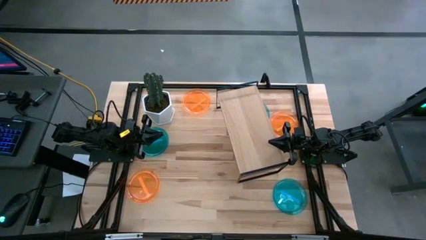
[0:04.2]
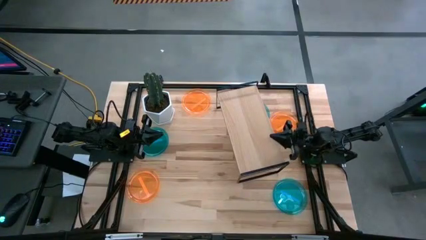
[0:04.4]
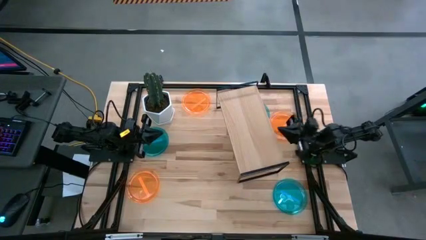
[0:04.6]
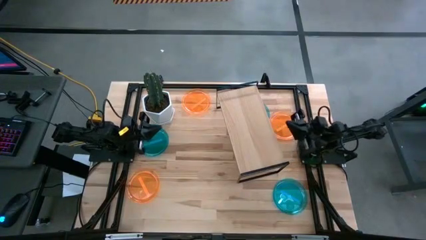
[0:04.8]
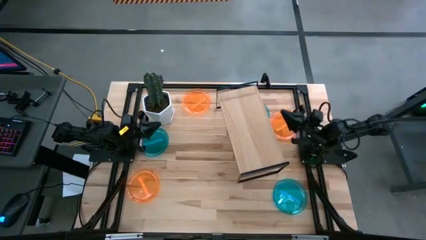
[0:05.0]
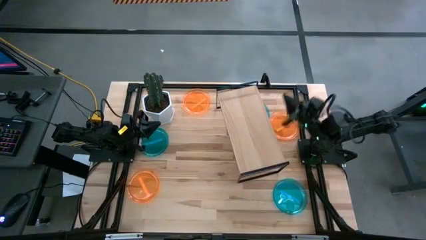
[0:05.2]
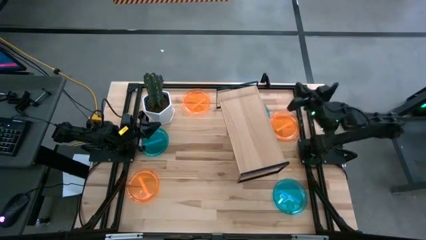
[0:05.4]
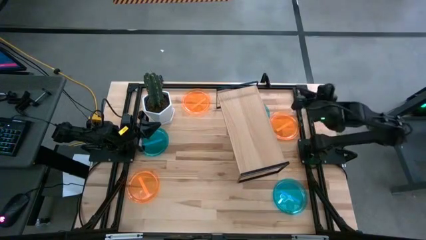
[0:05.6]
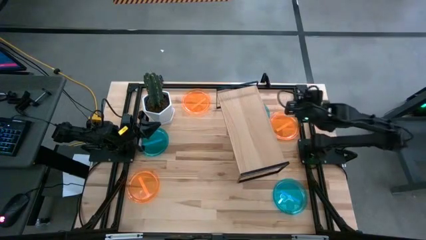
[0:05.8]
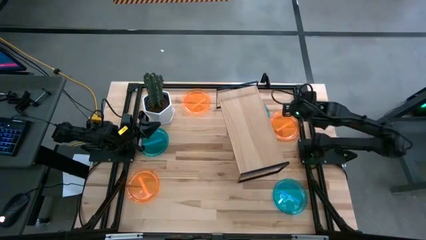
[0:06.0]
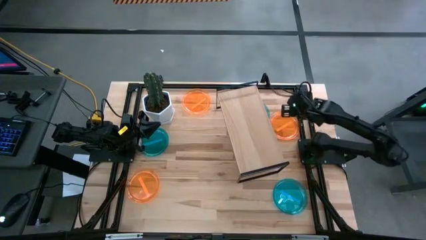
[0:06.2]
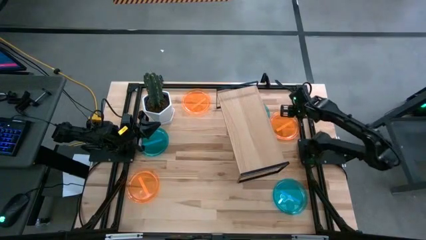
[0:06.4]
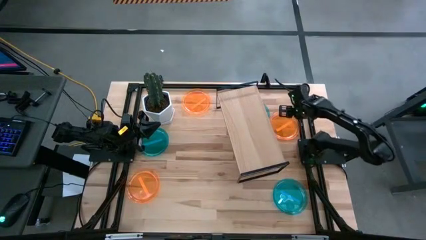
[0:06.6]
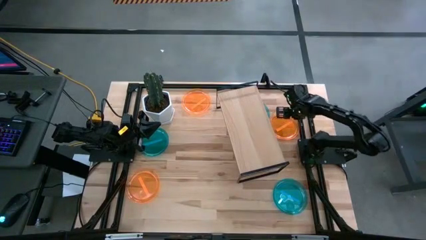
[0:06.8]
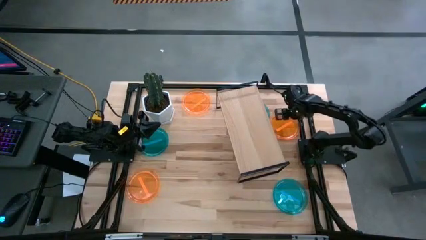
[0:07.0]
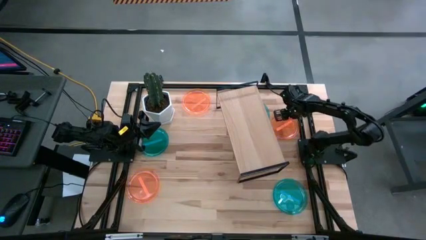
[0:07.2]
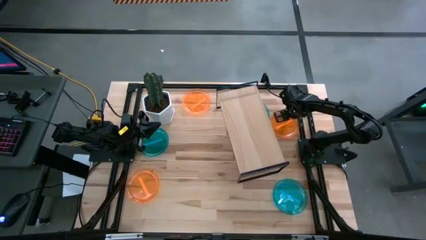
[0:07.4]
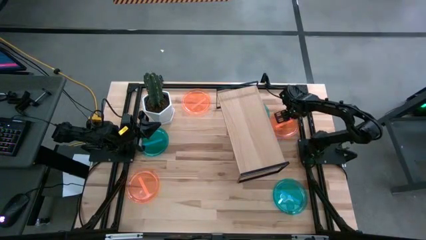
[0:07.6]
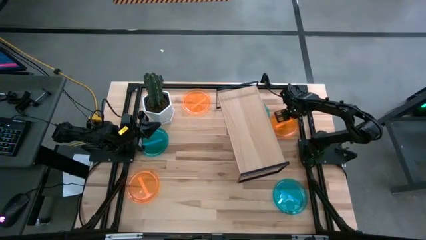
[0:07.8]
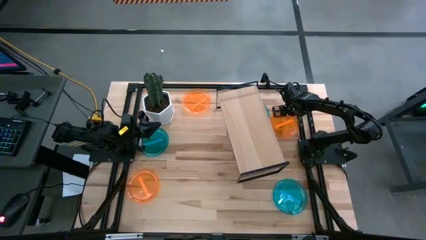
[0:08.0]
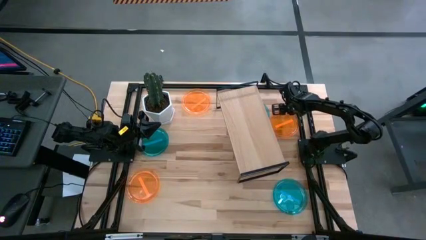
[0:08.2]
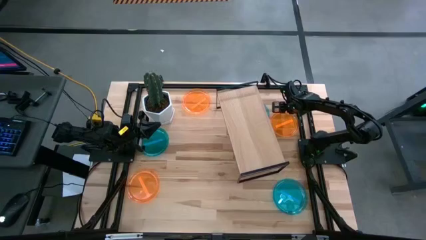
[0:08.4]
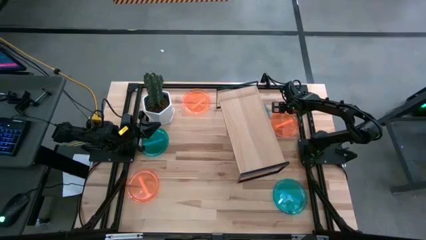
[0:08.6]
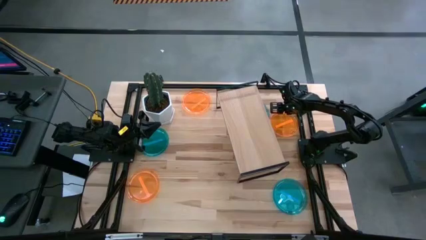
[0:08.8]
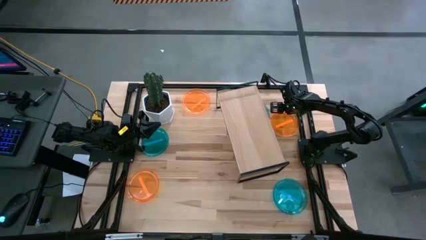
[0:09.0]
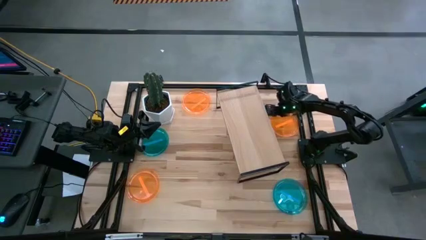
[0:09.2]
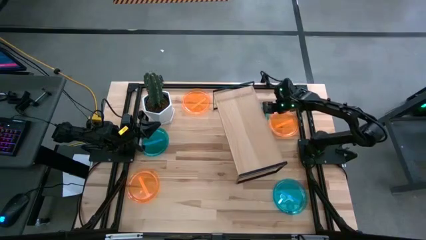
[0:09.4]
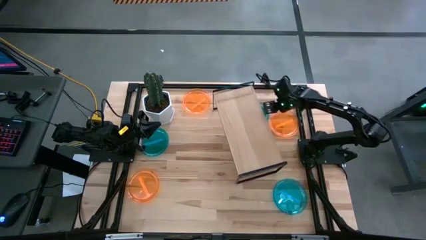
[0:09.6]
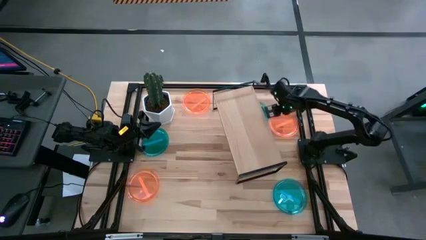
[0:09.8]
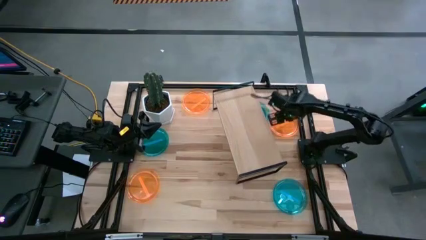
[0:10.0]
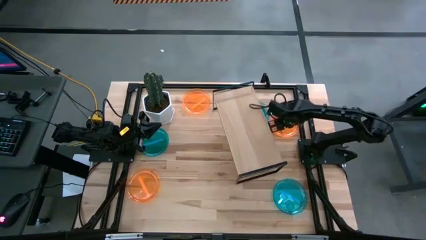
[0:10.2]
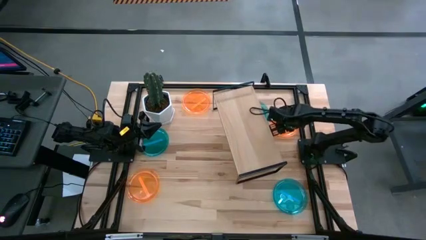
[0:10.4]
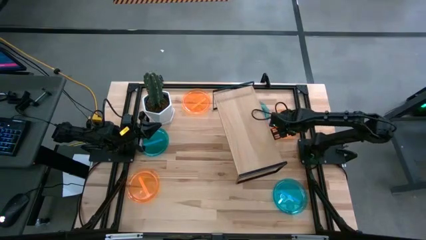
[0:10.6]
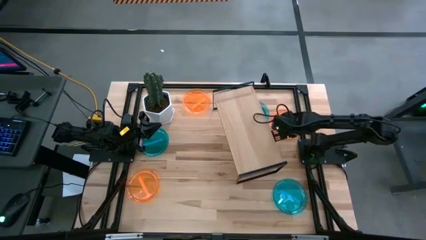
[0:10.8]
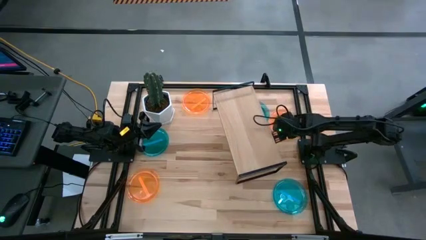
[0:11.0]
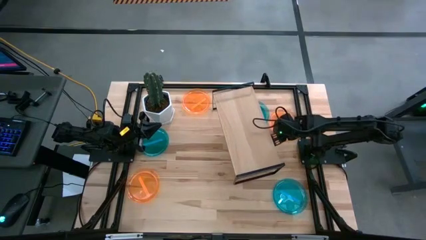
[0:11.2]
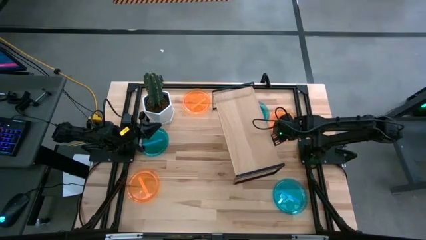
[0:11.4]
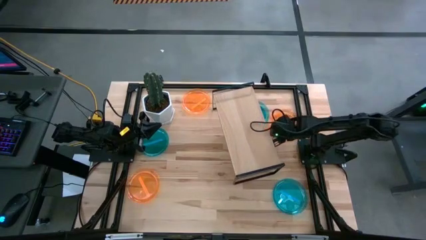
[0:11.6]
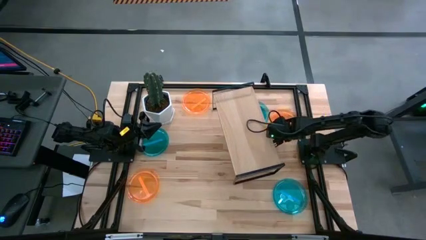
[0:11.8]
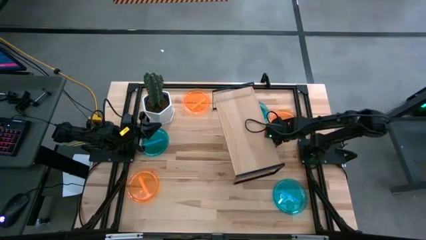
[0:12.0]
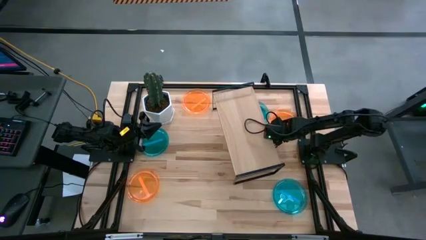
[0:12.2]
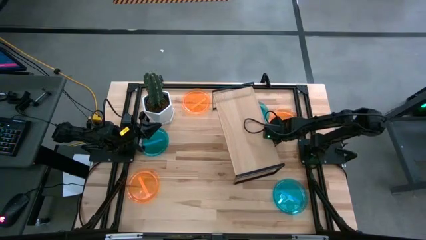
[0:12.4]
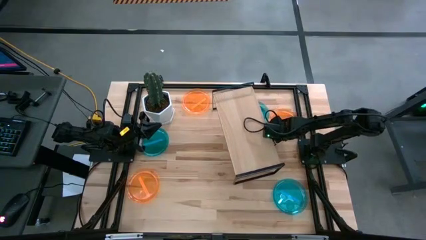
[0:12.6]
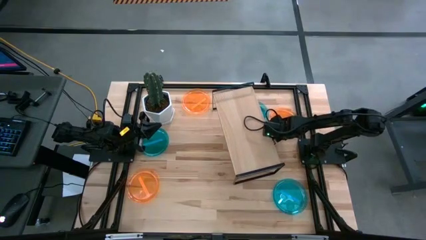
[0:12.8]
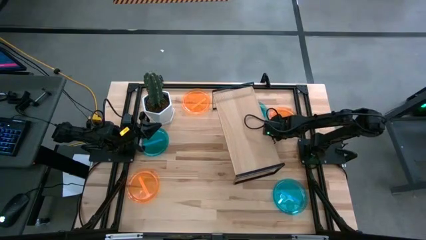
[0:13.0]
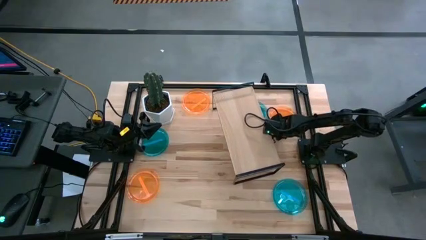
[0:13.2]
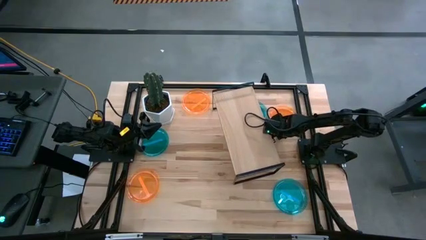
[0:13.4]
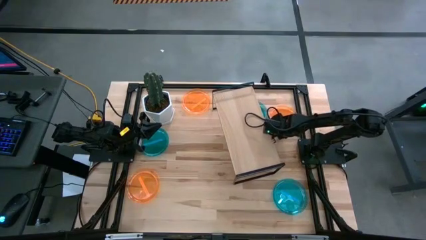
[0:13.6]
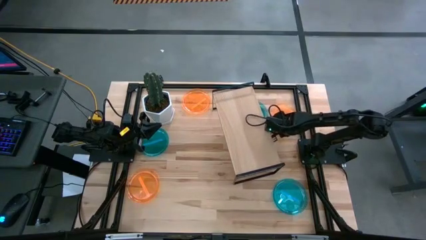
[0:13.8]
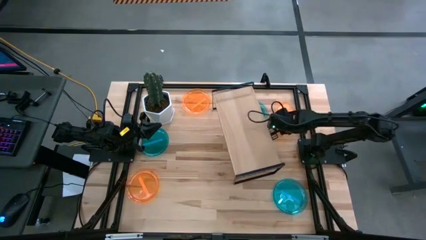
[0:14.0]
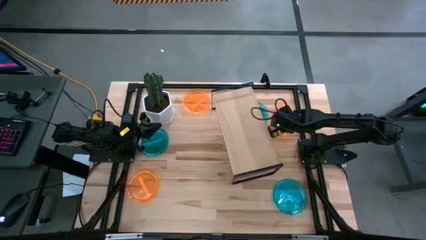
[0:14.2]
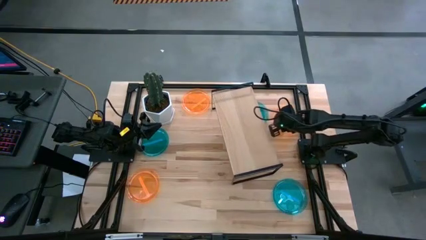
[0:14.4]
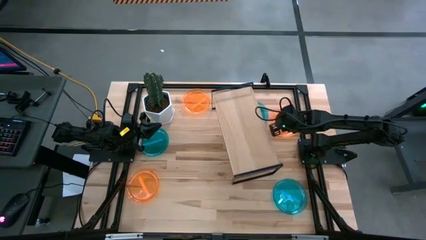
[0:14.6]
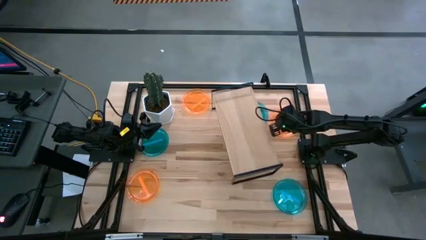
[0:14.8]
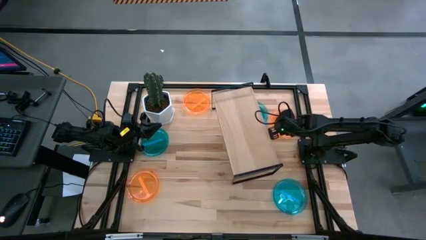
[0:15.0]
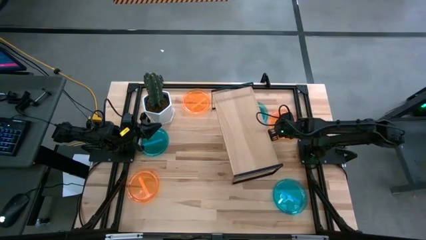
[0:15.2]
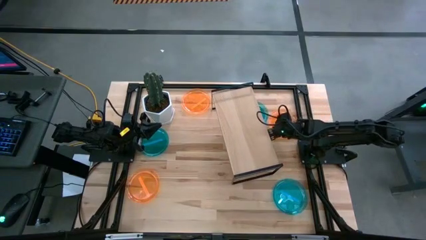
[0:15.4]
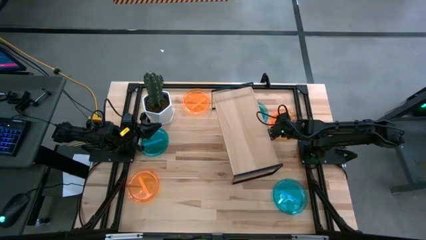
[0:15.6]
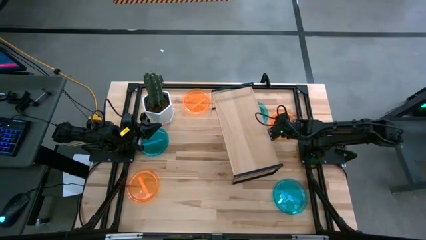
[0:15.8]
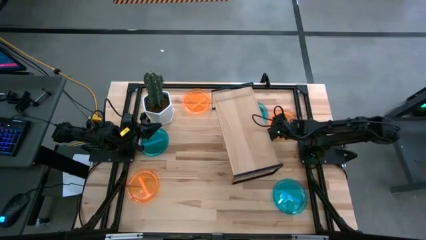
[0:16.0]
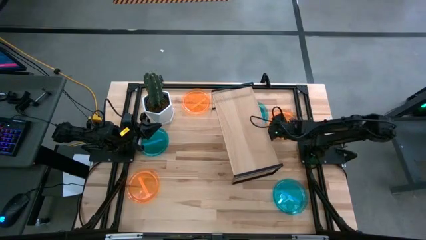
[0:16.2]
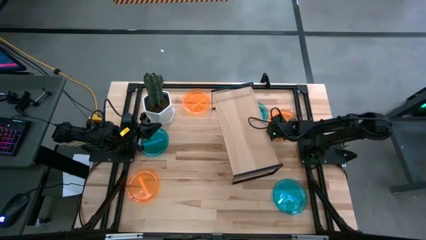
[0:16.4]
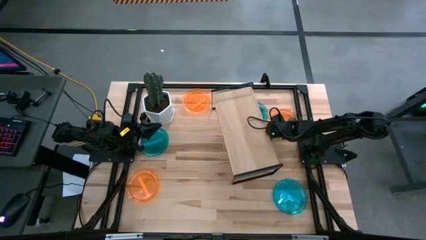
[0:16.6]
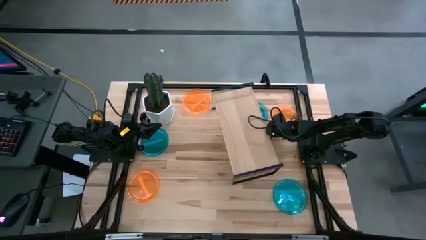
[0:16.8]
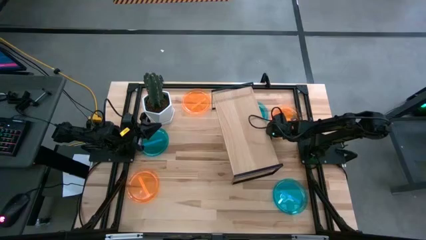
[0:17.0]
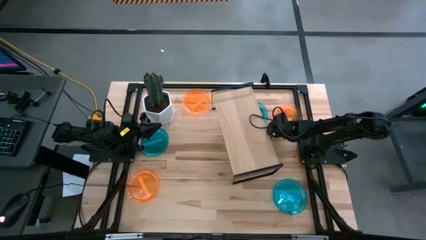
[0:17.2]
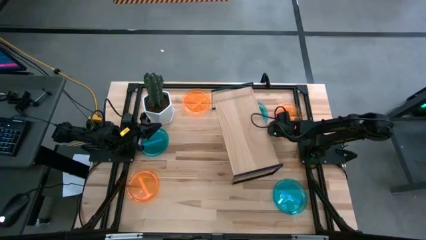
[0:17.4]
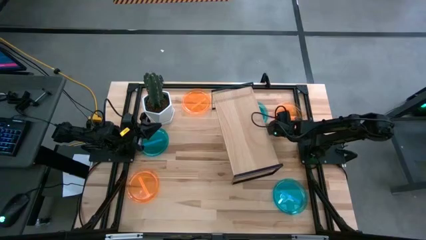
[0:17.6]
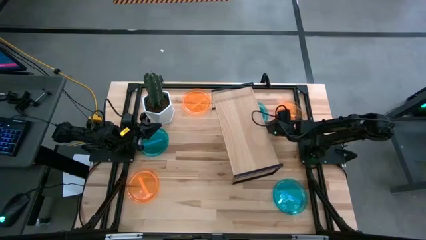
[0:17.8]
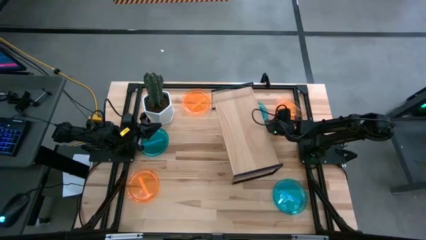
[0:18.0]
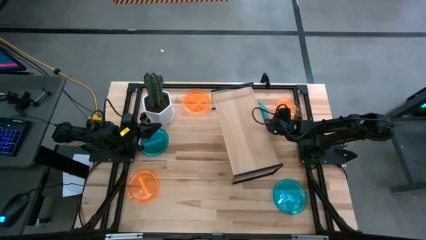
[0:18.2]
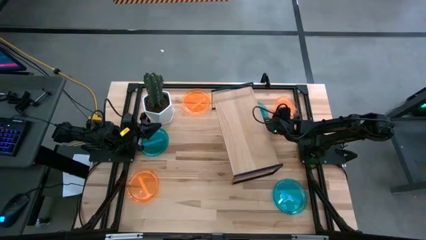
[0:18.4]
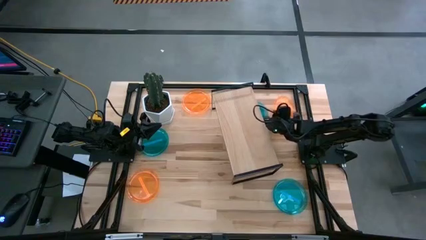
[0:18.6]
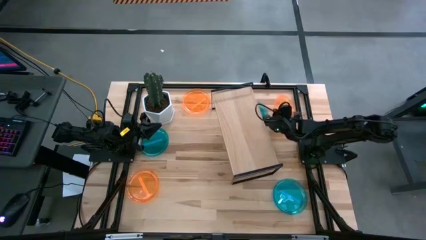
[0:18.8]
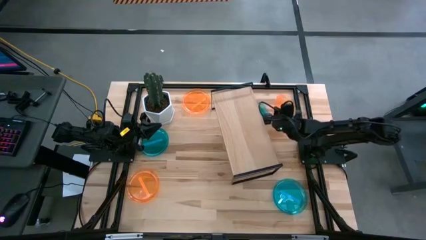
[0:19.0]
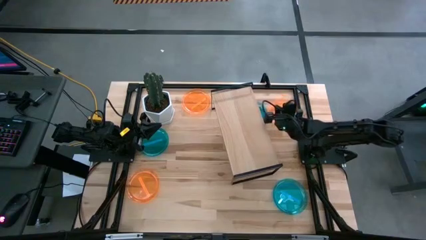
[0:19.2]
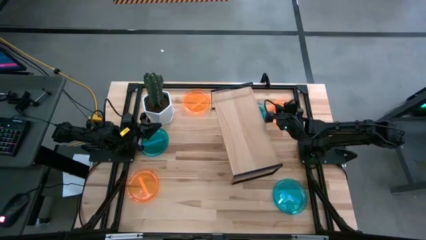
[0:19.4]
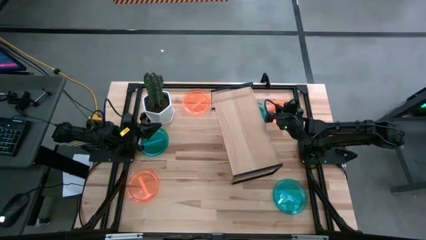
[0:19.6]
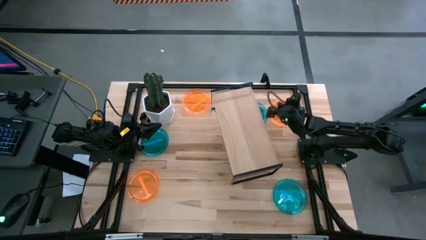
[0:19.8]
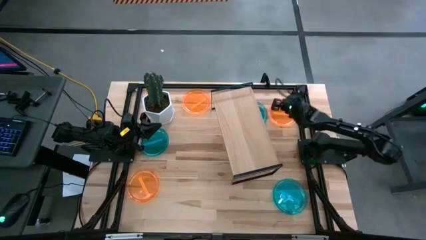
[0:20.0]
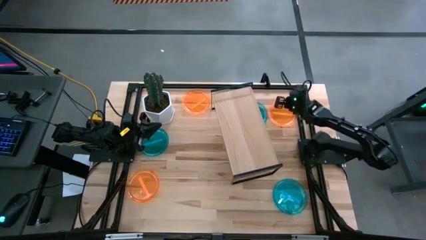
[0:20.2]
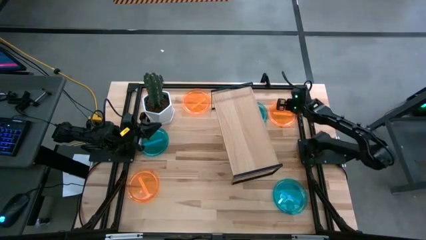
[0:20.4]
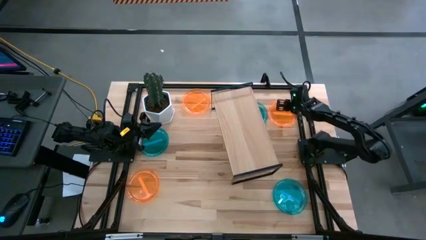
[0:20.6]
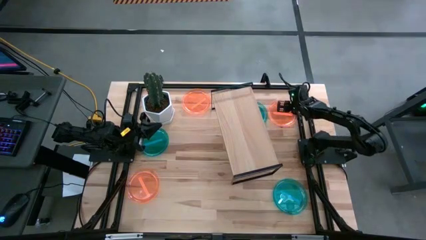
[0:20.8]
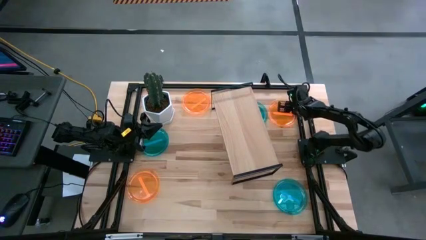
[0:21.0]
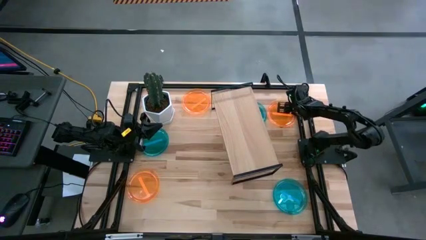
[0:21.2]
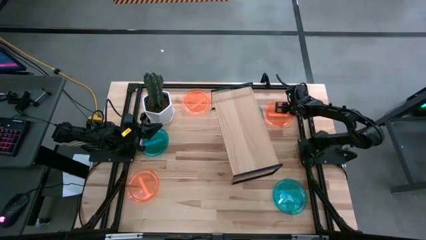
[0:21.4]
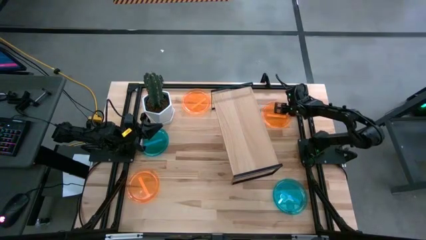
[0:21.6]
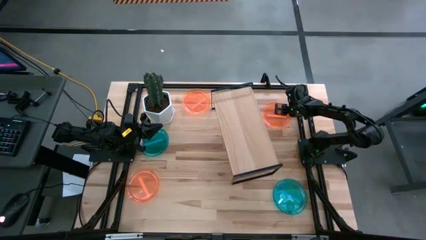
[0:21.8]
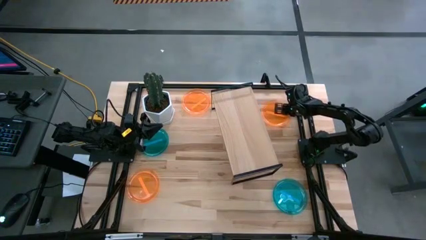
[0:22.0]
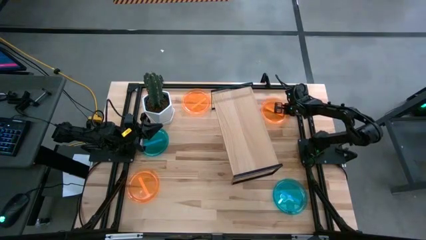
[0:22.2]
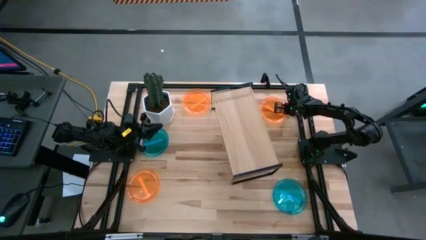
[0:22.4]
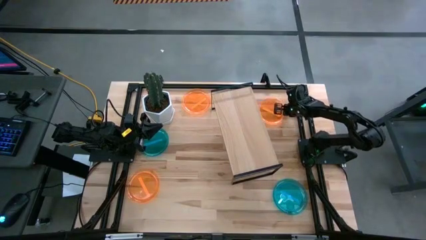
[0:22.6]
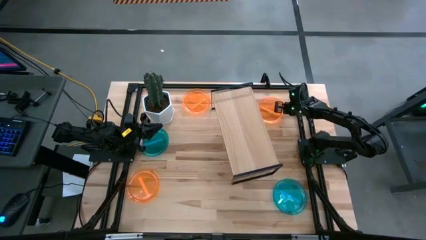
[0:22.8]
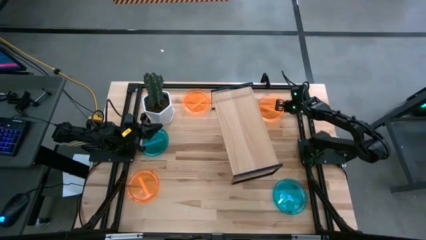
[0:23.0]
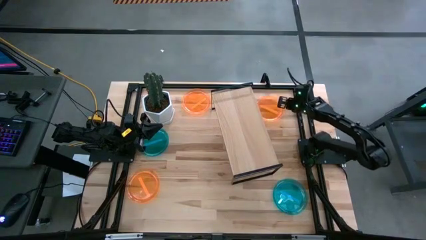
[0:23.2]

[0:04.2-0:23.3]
Task: Place and stack plates onto a shelf
Put the top right orange plate on the shelf
